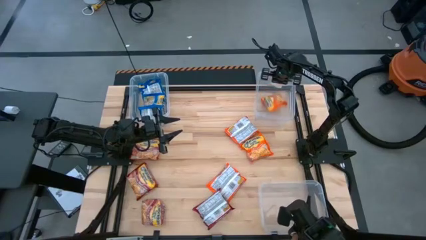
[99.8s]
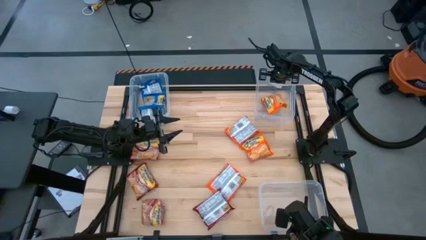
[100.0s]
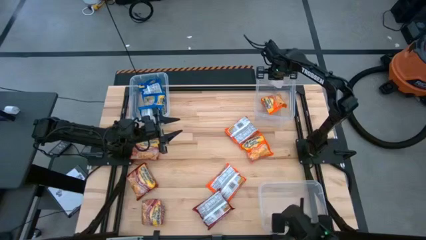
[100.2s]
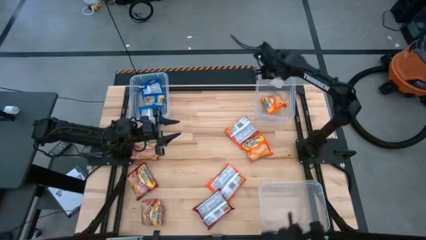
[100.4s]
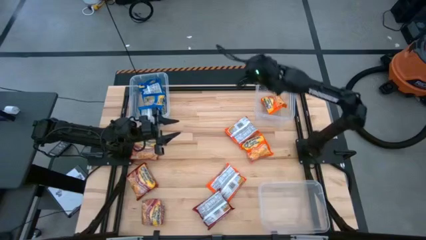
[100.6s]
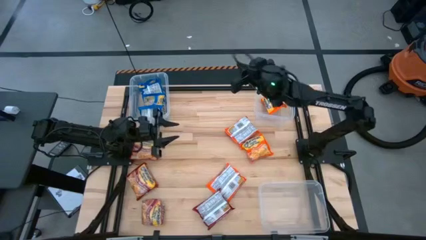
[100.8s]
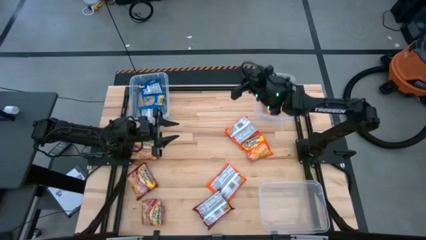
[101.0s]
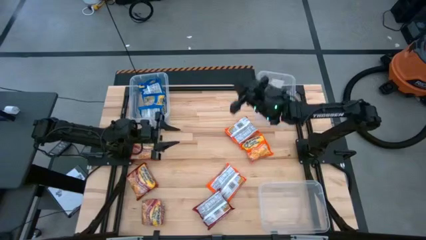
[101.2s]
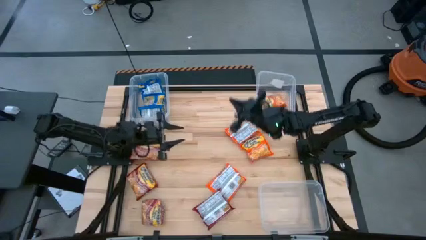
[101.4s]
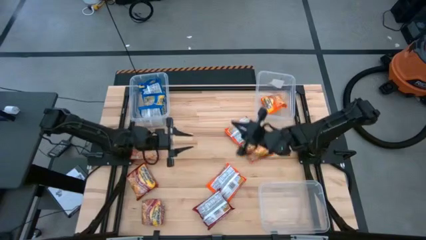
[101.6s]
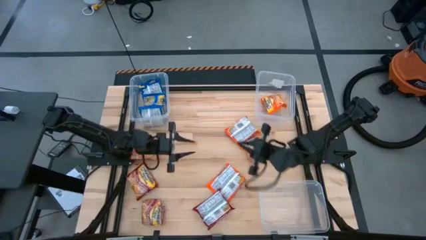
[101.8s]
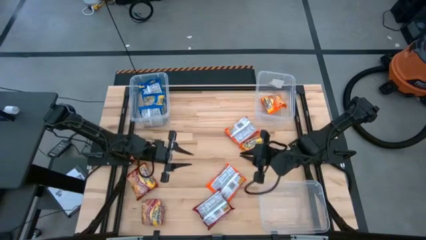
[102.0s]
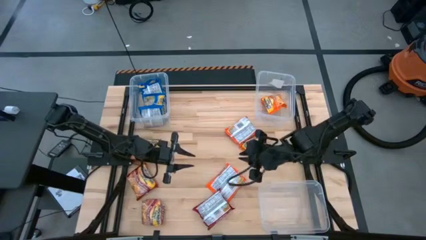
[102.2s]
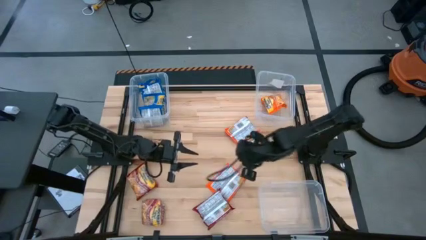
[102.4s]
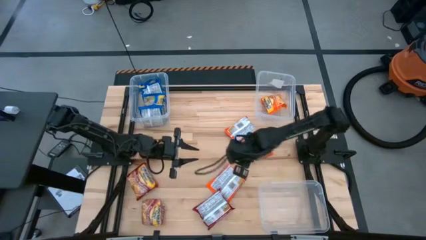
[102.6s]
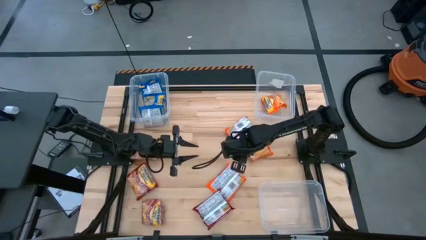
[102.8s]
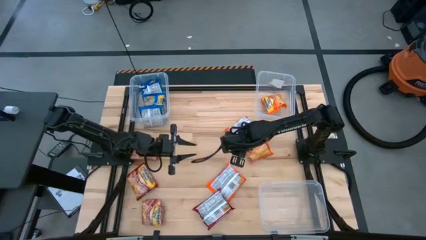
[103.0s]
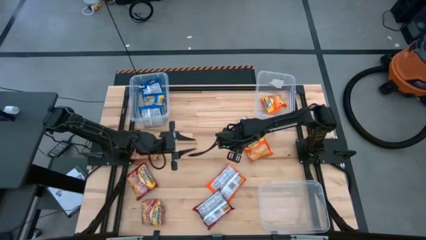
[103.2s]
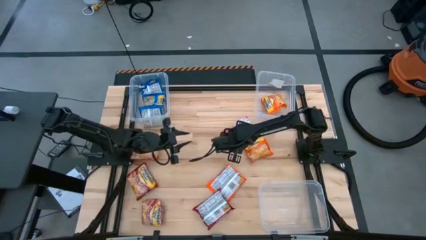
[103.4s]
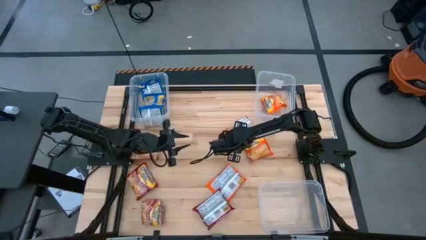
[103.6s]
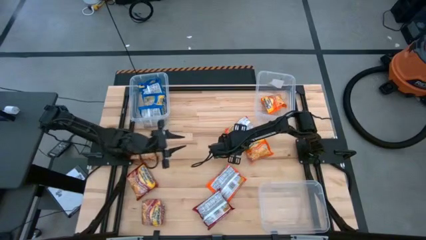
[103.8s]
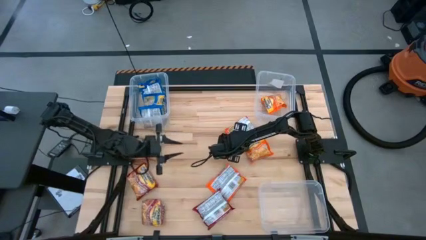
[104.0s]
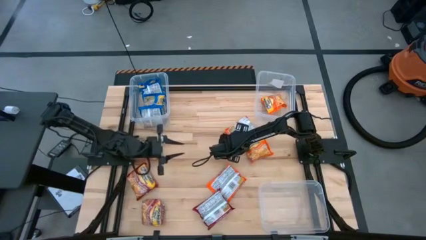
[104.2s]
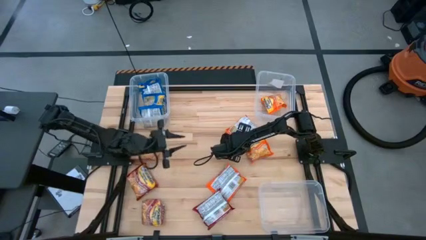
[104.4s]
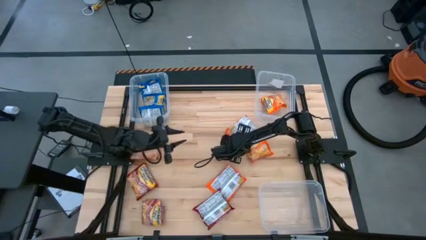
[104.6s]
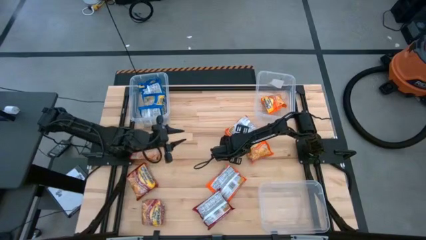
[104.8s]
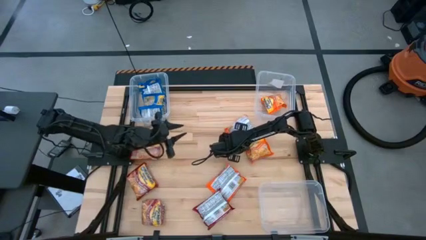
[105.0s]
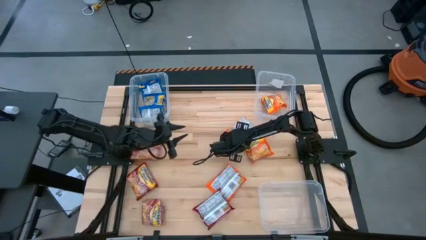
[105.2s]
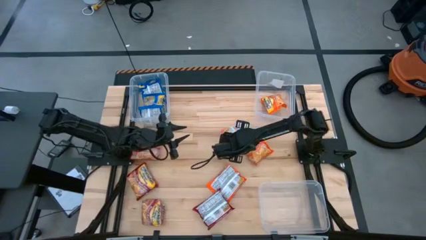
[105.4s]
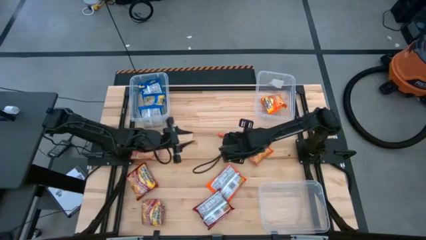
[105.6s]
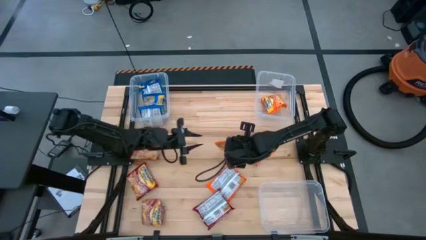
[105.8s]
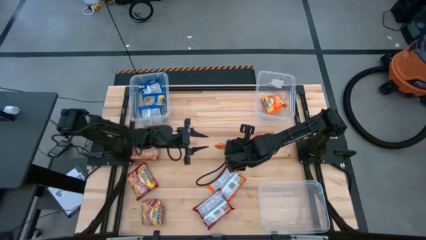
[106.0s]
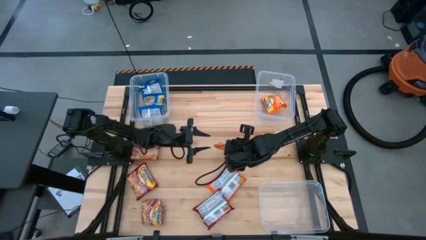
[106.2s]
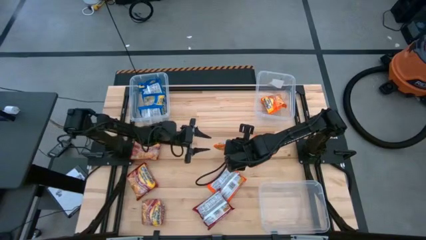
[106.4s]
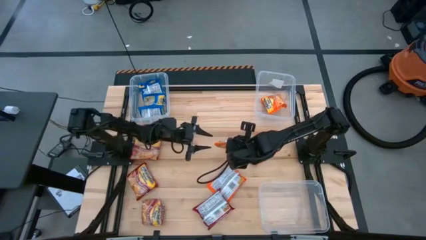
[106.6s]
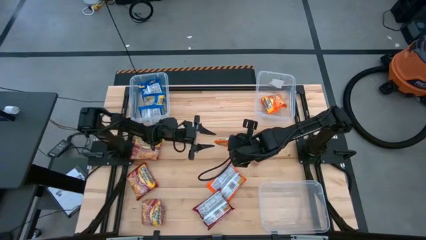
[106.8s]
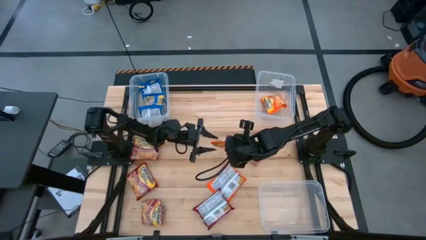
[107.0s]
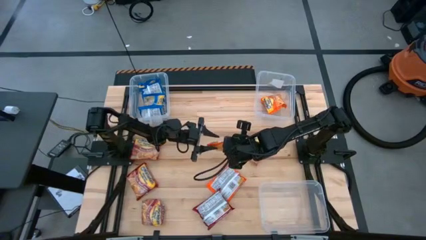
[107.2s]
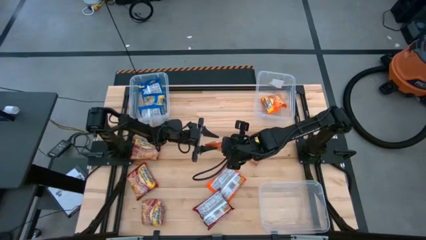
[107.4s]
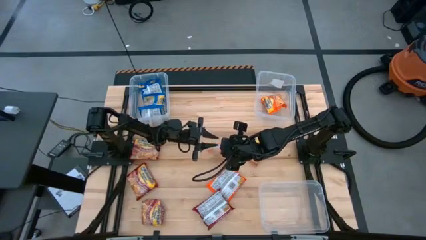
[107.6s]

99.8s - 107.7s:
Task: Sort Maruchan noodles
Put the orange noodle pack into the top right transparent bin

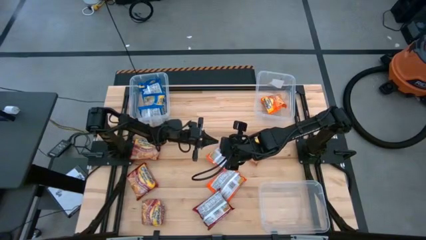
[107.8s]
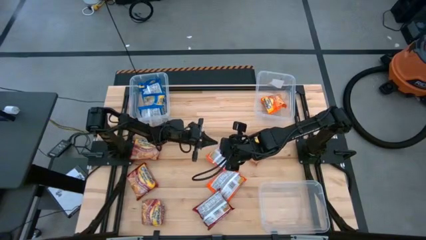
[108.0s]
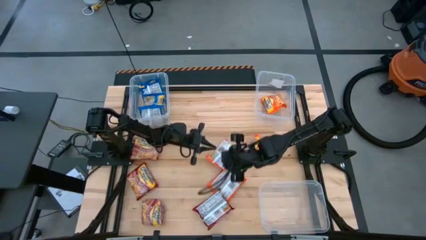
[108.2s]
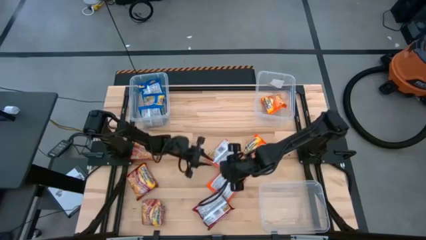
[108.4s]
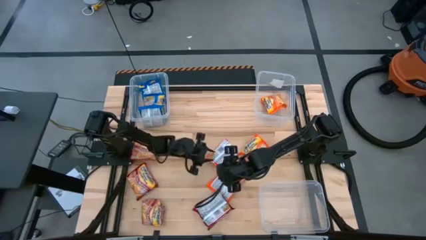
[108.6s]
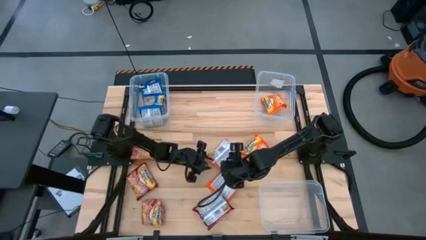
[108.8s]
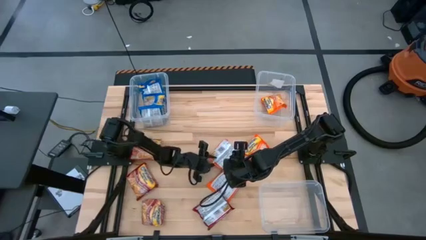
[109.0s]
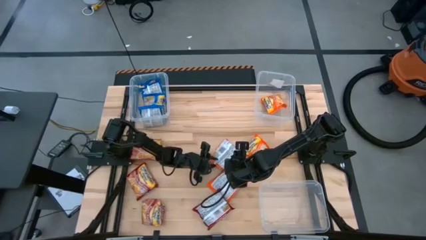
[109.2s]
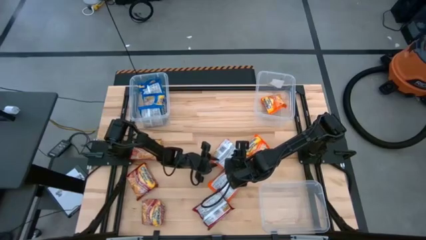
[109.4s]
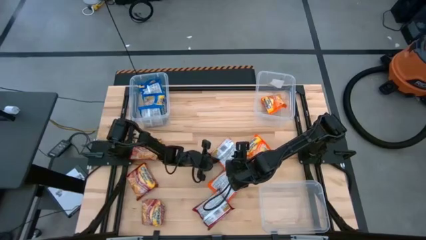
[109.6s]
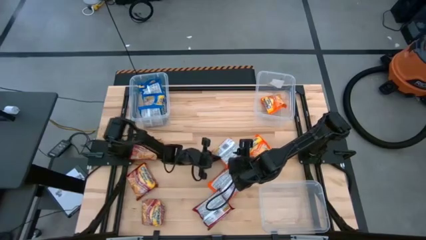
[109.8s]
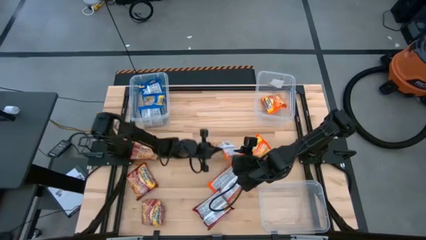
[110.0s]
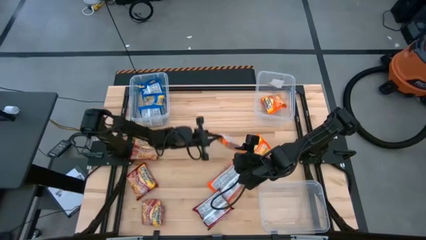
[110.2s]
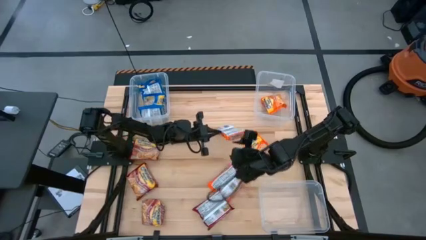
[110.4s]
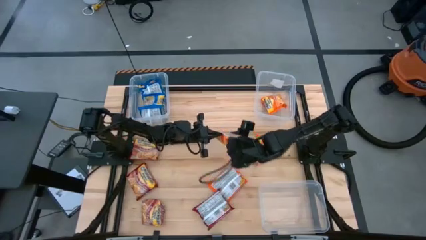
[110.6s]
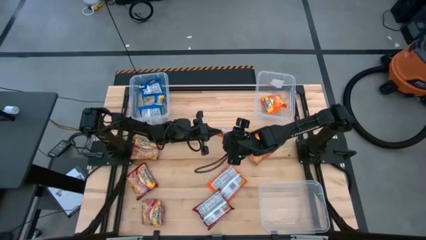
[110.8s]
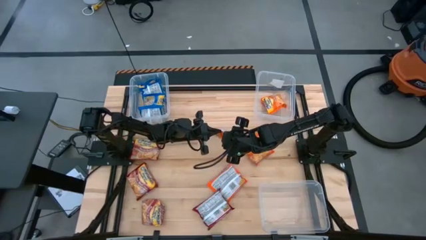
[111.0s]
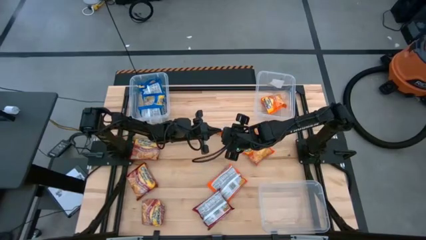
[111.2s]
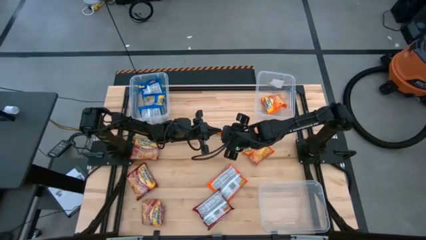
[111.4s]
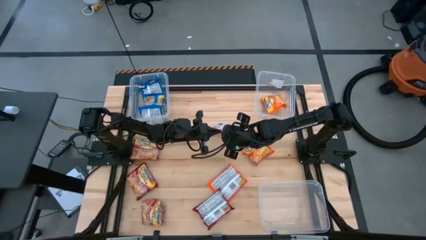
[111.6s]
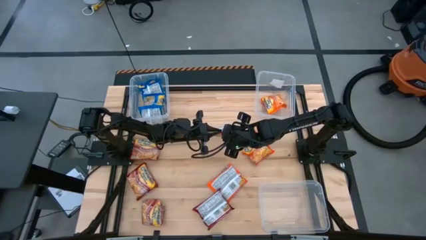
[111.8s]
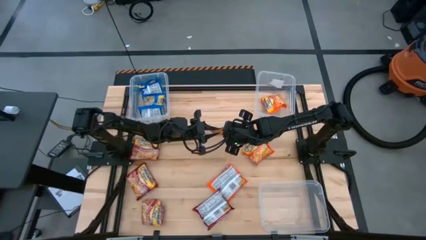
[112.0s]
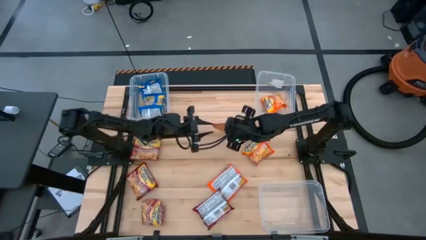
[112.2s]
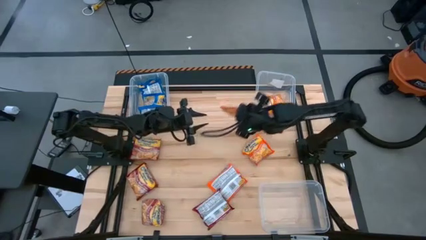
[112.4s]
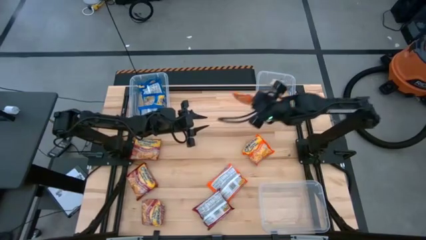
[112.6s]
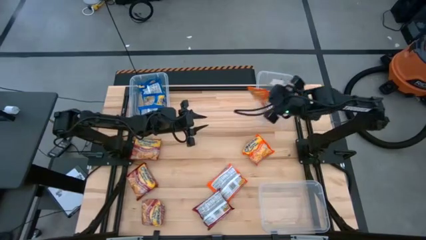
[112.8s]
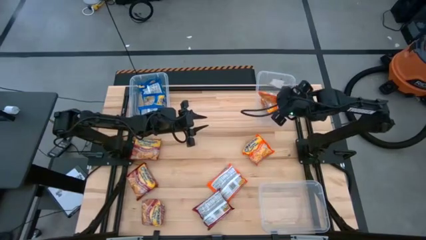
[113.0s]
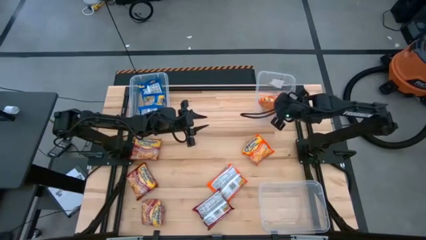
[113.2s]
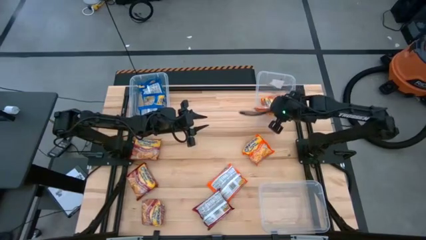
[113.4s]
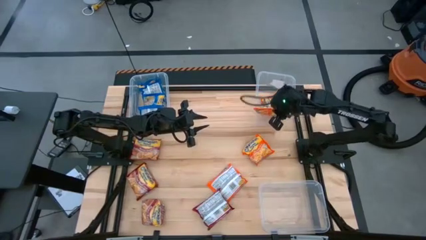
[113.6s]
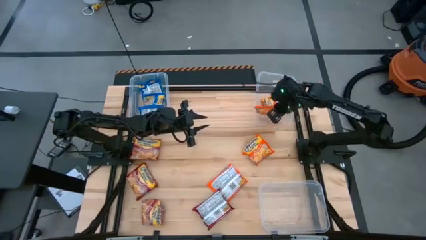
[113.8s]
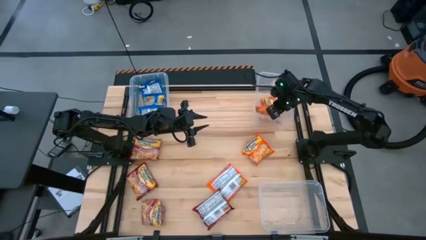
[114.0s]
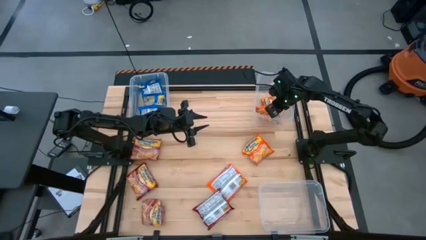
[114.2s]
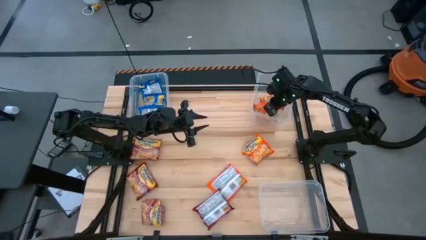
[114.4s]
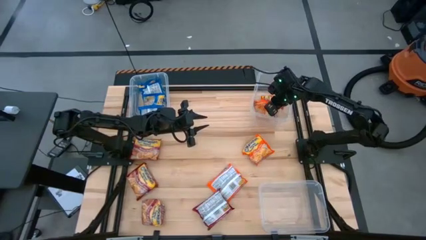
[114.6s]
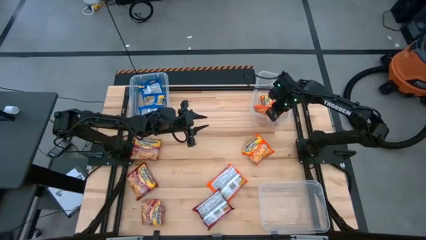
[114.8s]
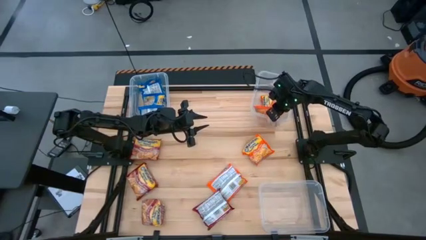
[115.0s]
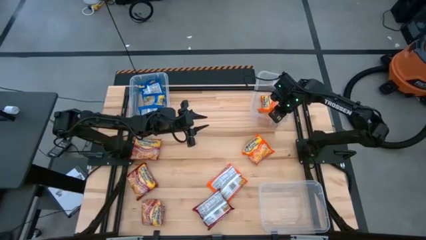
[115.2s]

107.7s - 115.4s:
Put the orange noodle pack into the top right transparent bin
